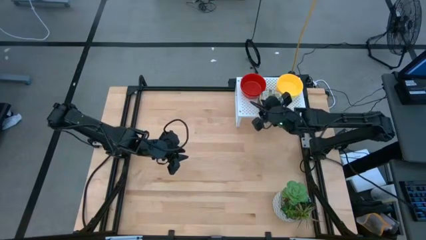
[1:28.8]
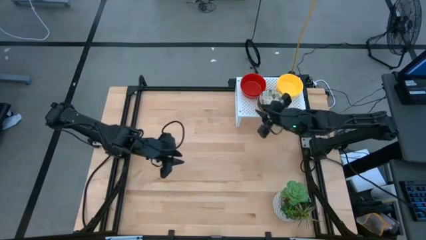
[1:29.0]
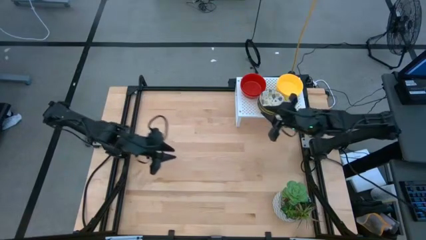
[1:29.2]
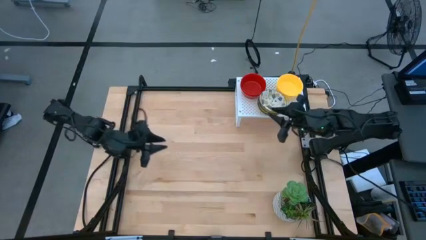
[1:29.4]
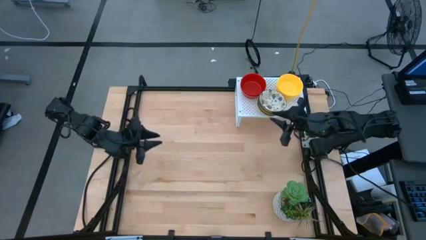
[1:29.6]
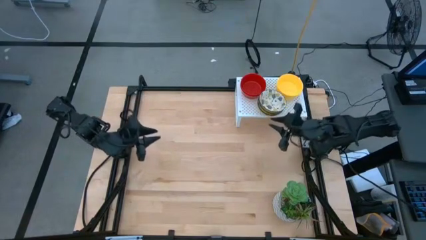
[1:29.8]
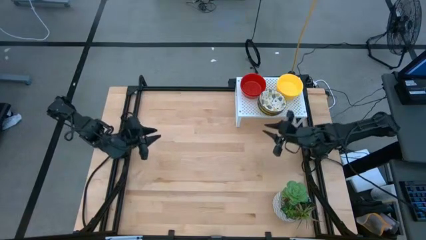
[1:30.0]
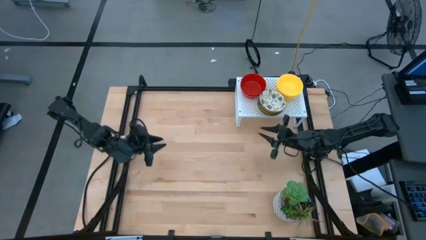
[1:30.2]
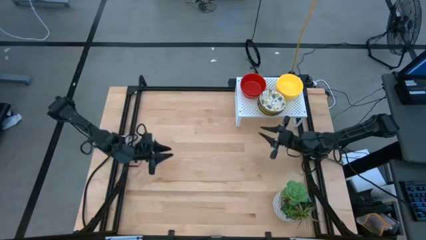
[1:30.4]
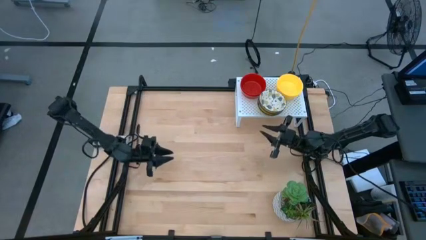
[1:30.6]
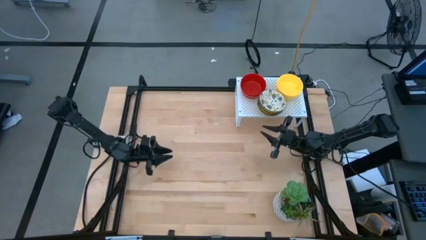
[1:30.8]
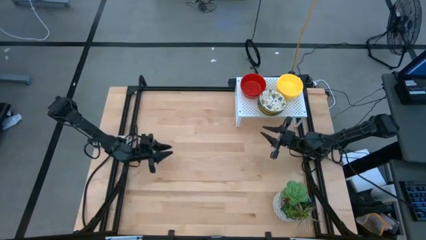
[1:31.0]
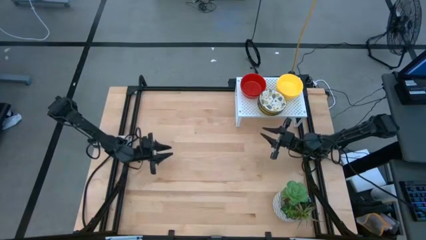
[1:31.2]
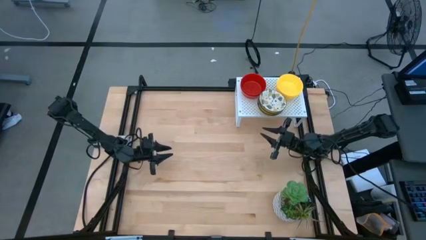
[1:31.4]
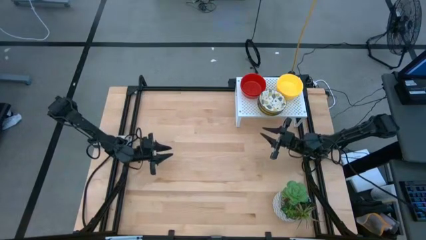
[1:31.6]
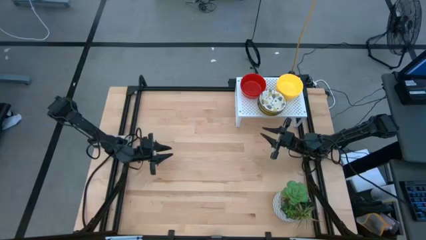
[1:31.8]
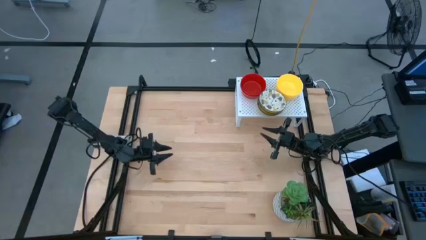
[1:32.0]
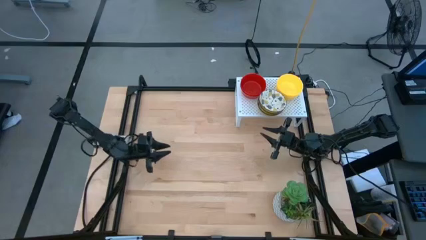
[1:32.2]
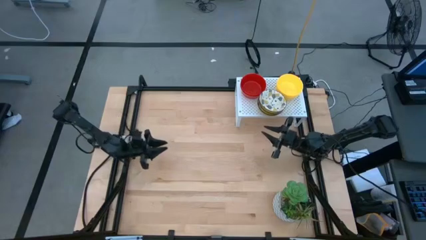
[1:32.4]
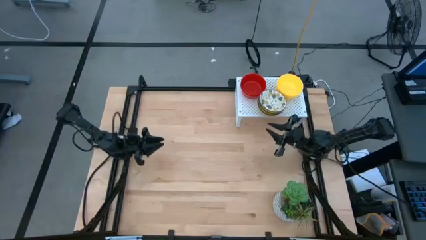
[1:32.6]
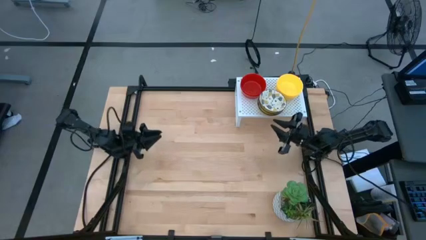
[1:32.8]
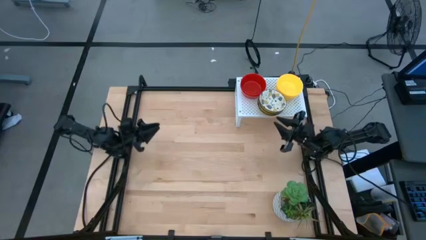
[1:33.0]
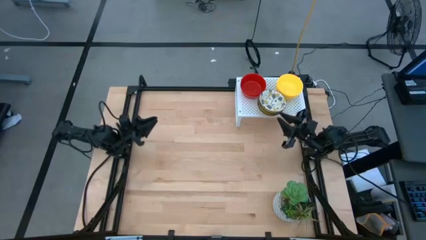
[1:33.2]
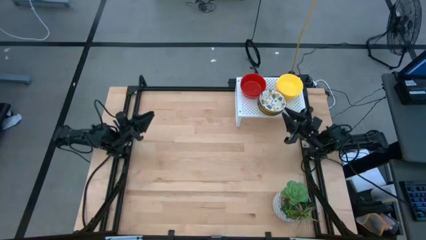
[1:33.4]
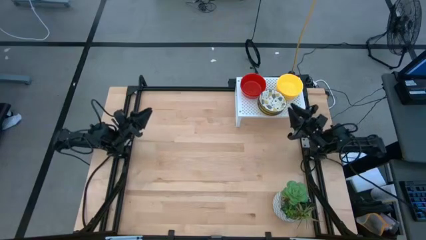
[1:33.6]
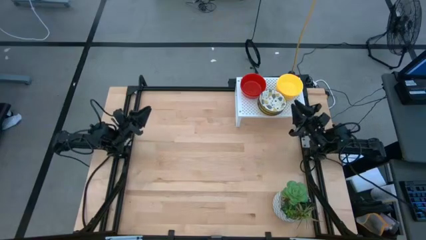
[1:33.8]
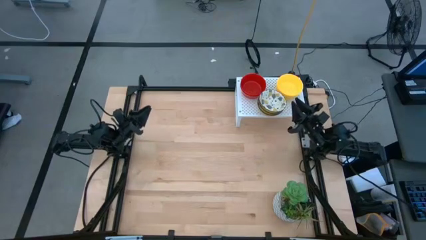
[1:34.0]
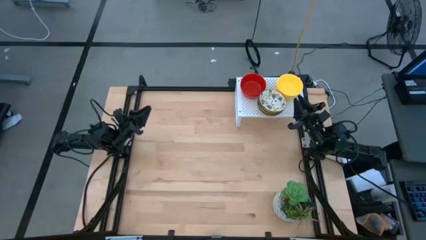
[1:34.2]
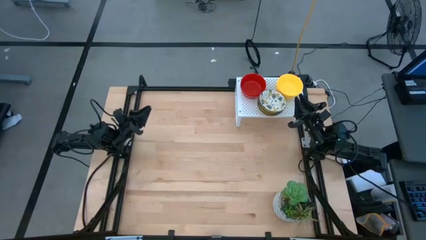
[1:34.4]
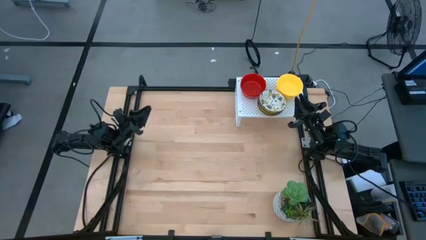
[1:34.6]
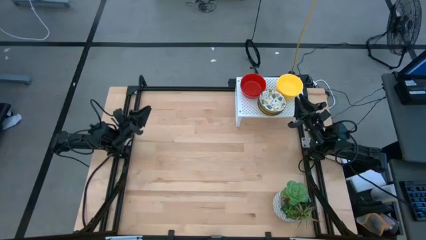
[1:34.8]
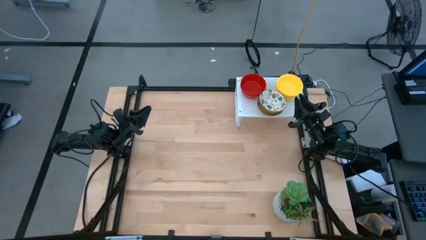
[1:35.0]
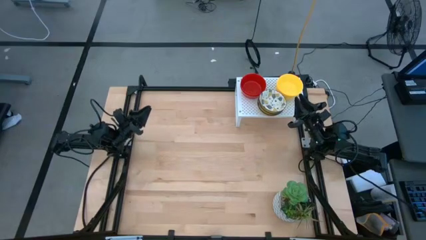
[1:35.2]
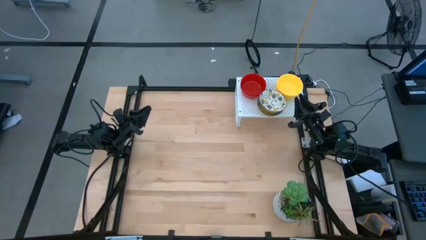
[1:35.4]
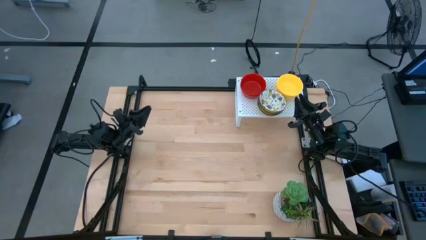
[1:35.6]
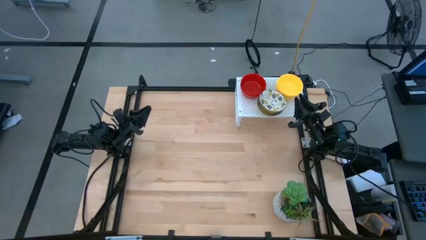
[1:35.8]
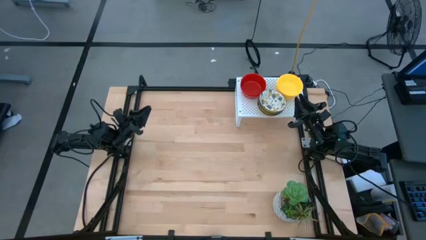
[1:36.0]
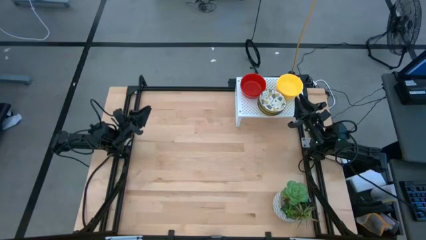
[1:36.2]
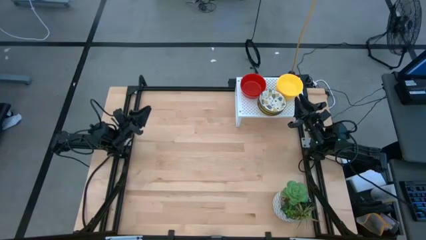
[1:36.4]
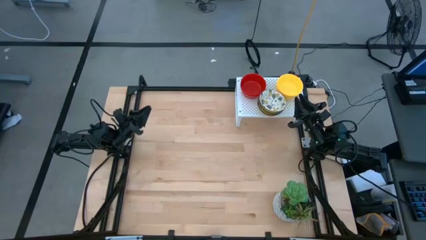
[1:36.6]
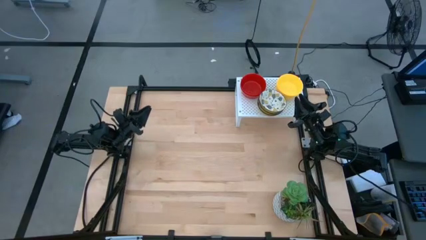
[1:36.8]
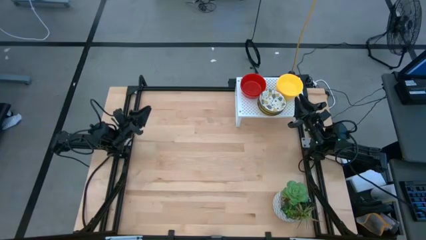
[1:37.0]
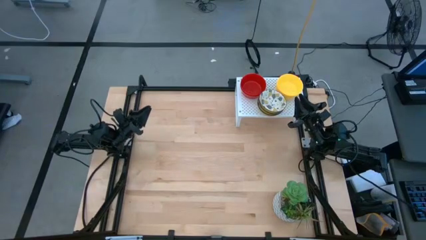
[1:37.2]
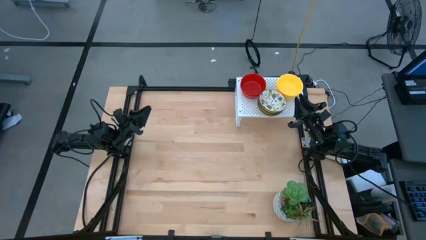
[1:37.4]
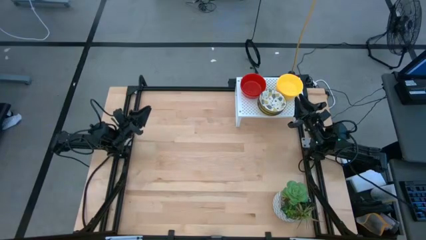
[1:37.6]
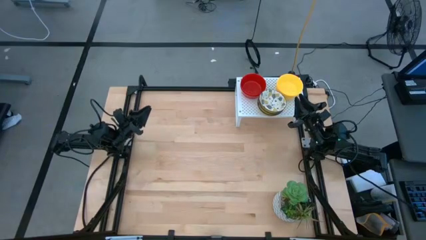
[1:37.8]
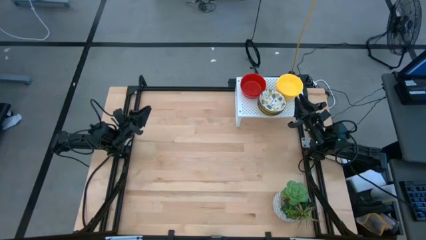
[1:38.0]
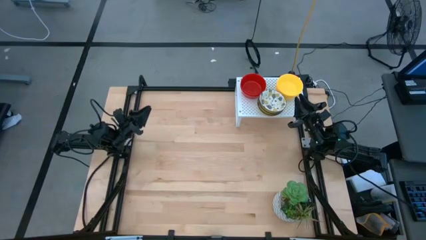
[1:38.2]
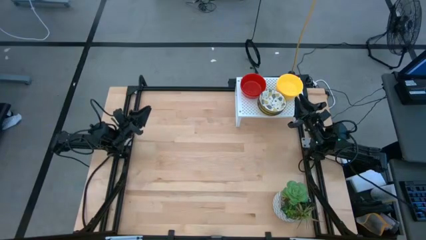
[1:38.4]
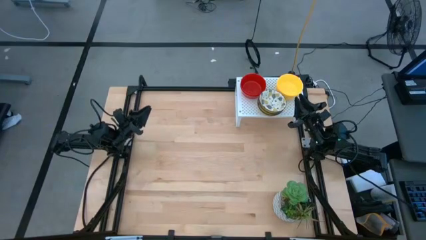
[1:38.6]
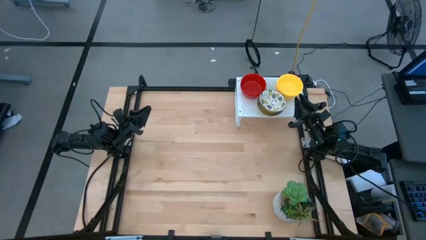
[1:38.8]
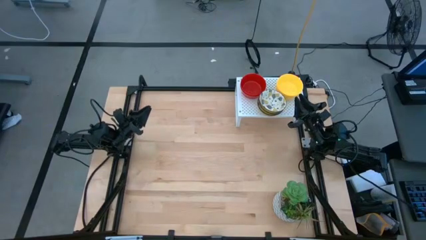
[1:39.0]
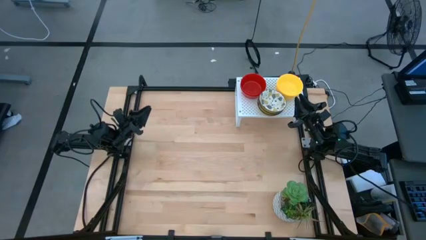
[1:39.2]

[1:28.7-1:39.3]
Task: Pick & Place Mini bowls
Return to Home Position

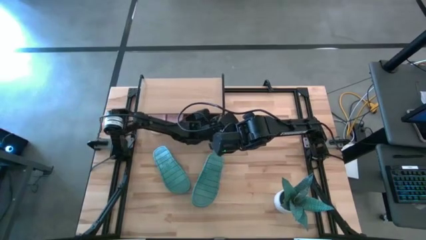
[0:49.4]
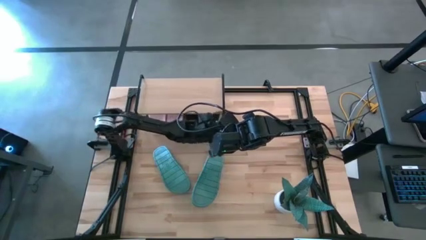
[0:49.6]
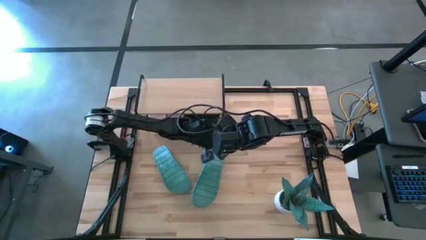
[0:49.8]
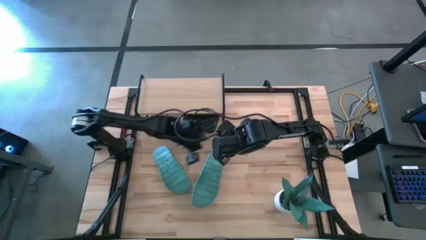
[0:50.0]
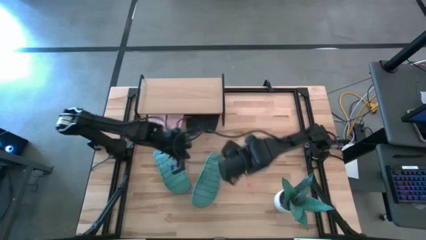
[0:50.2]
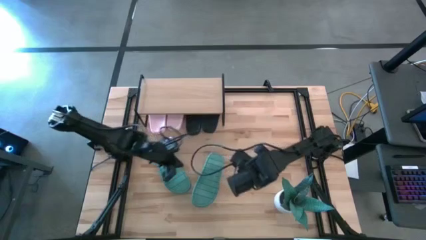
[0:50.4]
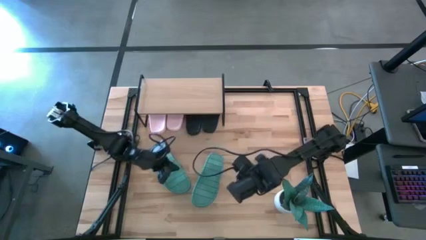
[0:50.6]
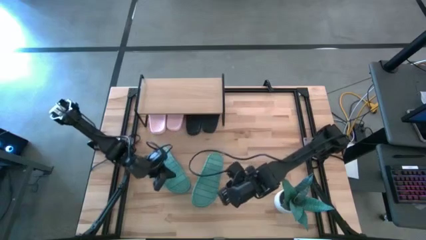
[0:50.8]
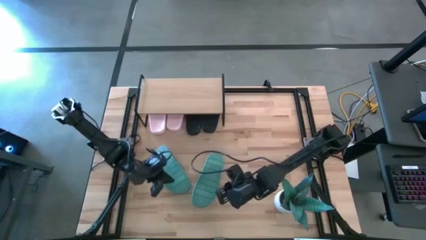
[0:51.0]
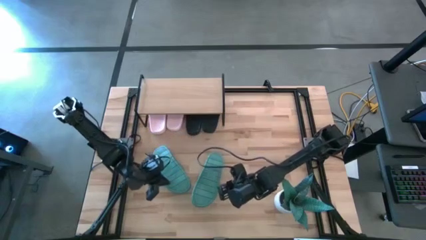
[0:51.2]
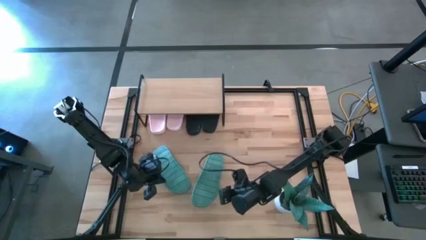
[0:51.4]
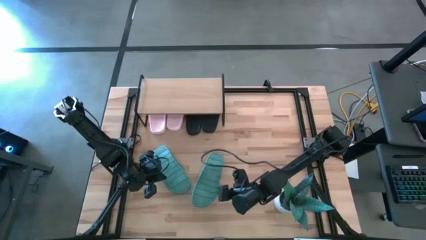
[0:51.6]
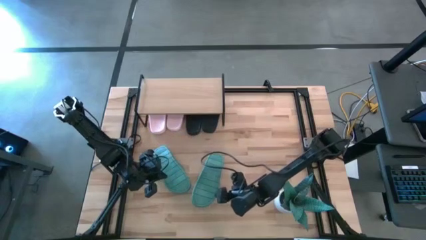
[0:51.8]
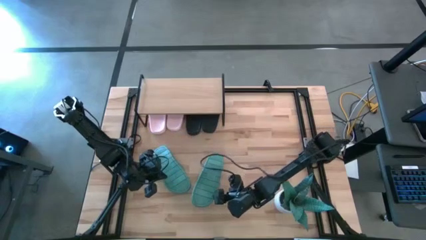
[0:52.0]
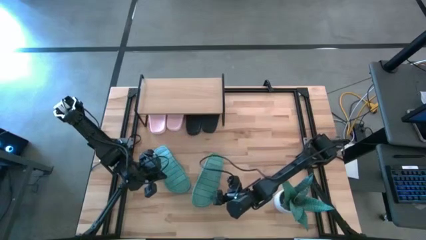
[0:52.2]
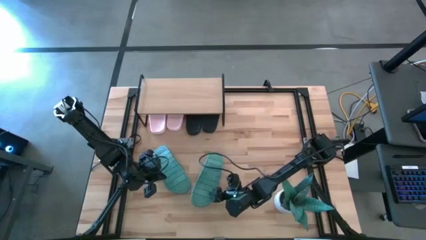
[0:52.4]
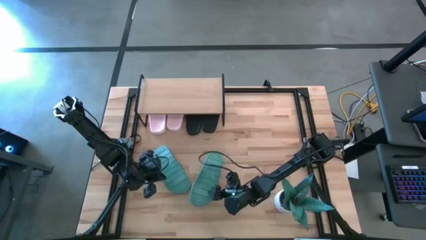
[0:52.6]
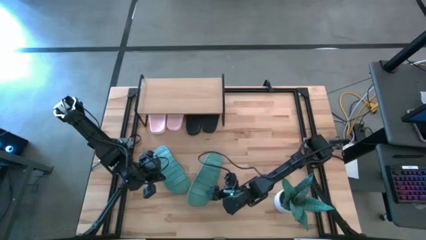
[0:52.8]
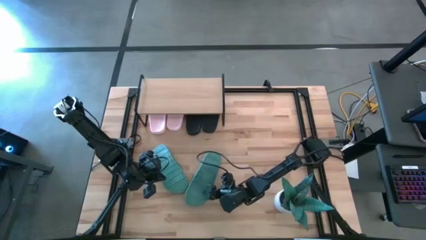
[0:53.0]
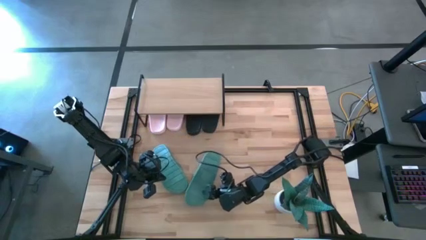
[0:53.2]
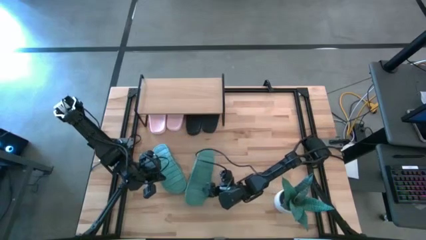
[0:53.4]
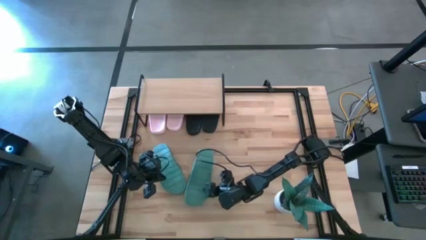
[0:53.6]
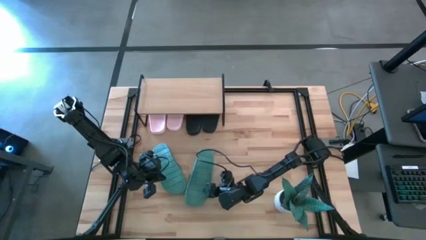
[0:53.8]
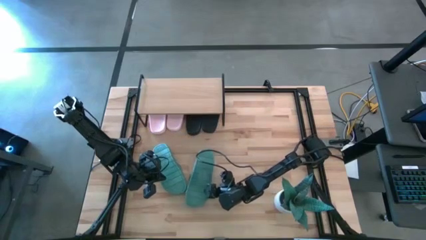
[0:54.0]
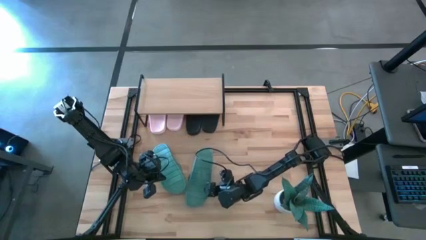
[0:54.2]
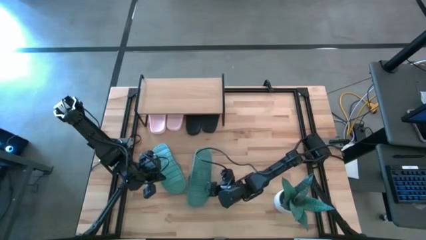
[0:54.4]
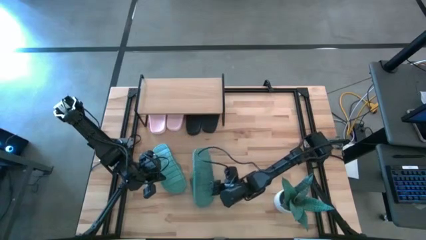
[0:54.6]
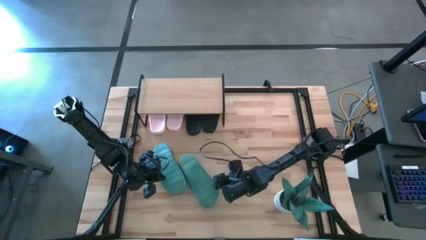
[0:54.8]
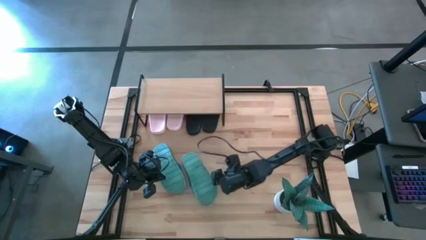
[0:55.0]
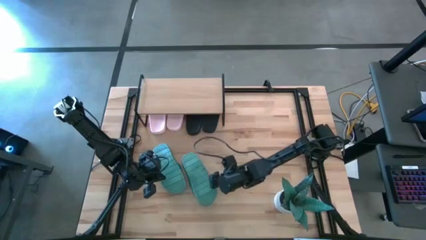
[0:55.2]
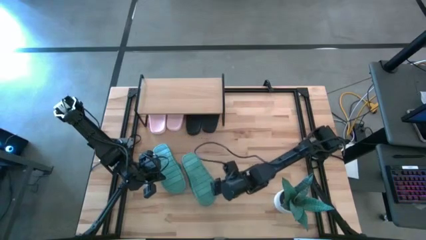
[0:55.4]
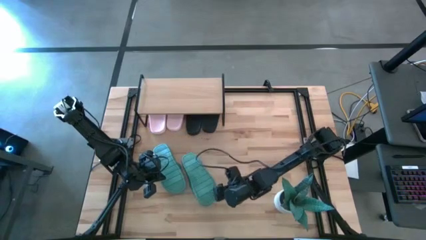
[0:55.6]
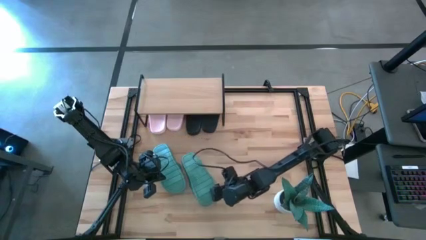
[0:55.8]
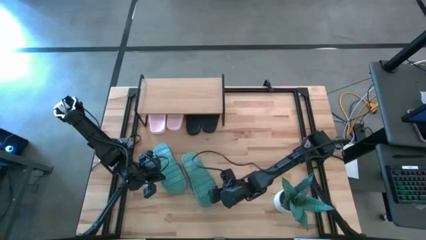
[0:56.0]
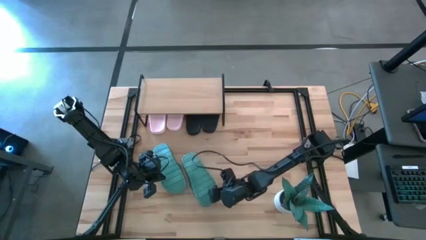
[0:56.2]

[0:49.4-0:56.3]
Task: Pick and place slides into the shelf
Put the right green slide on the shelf
